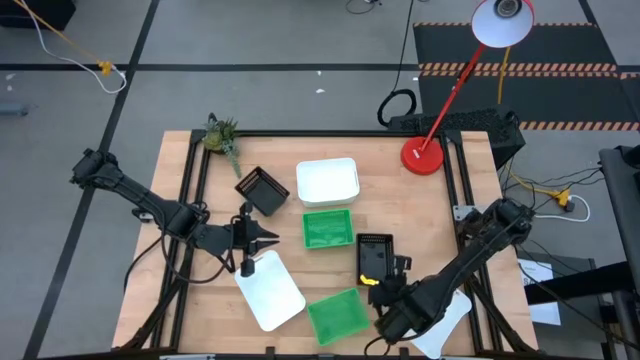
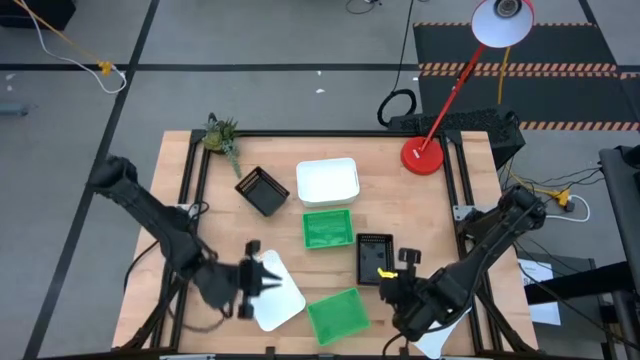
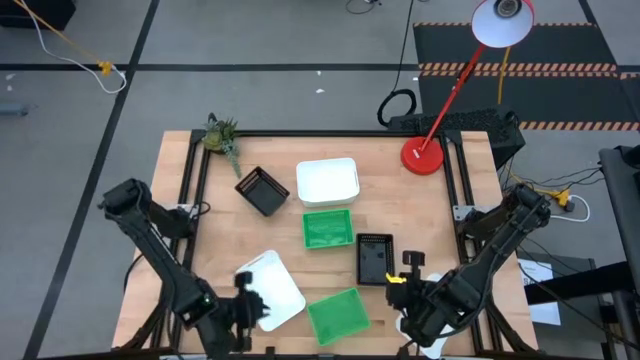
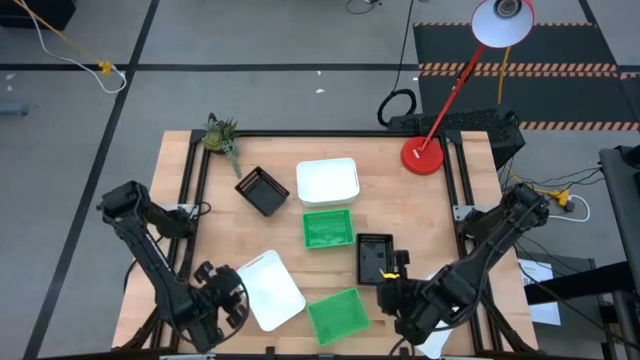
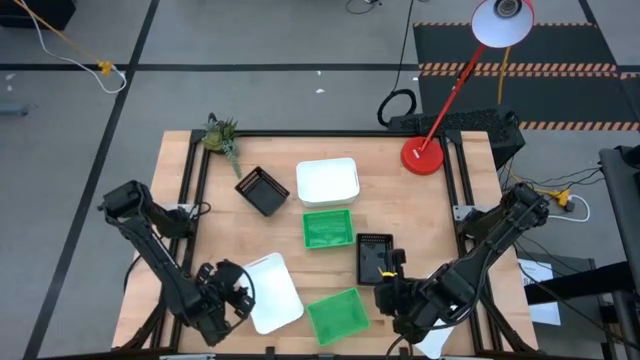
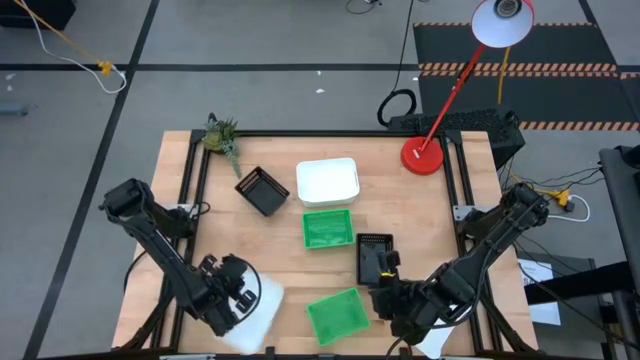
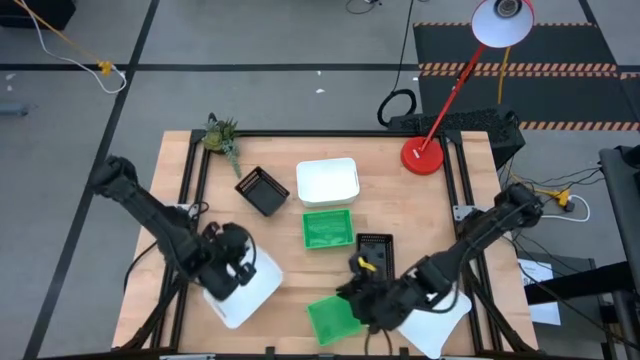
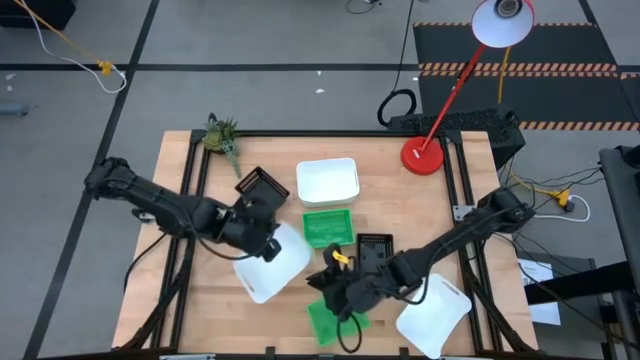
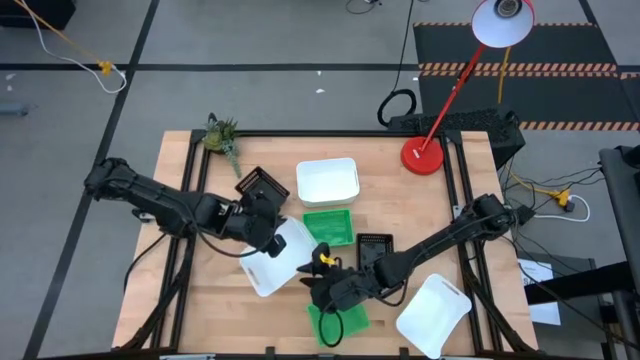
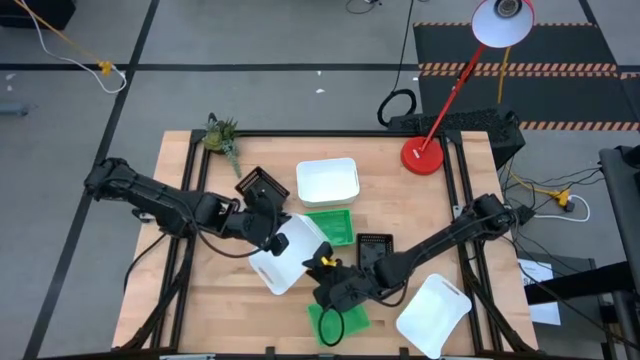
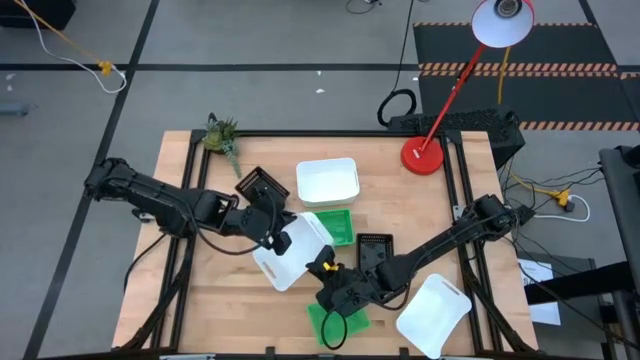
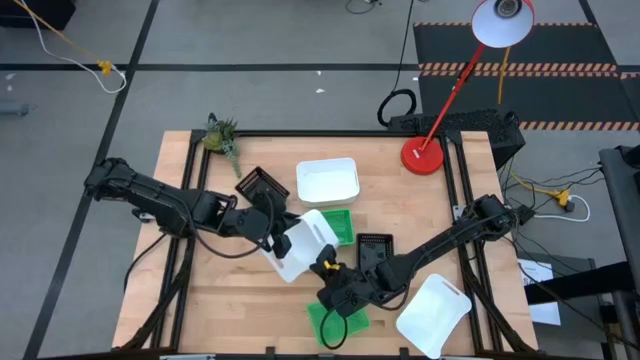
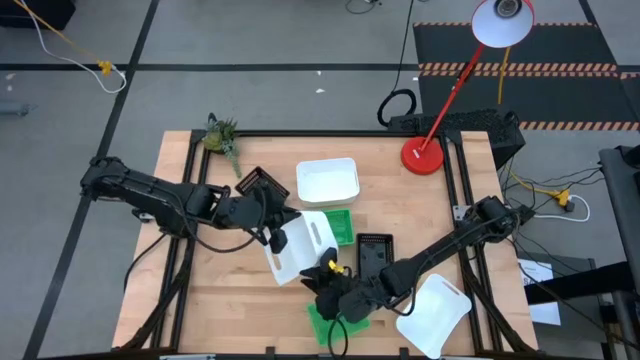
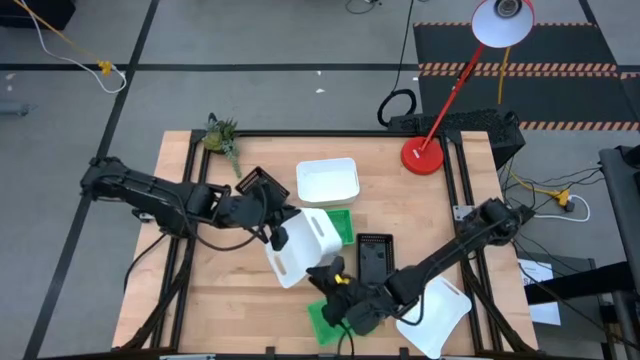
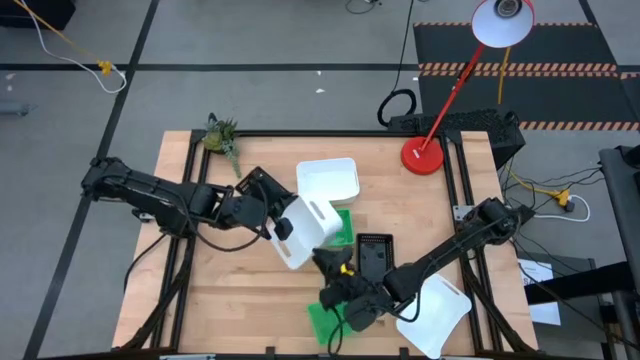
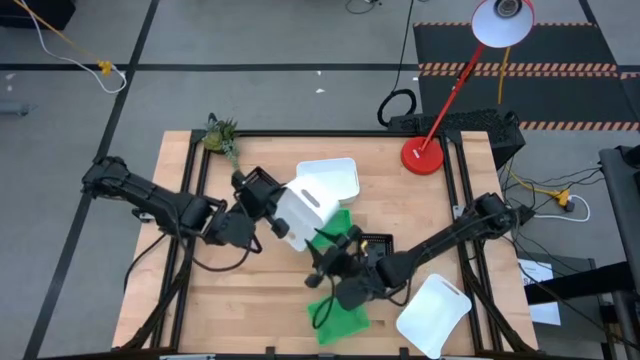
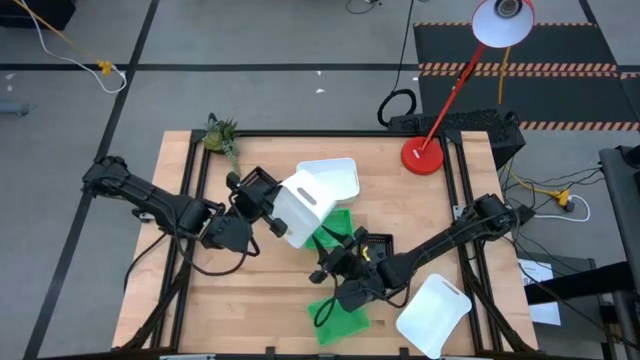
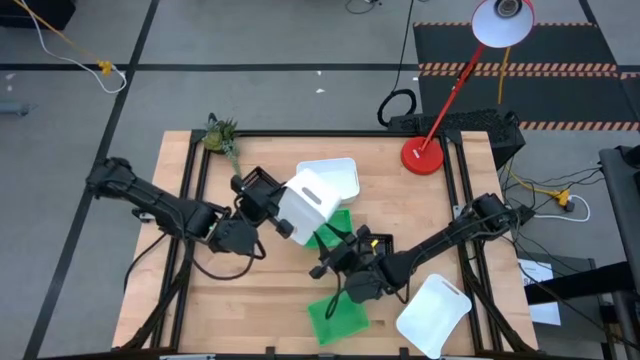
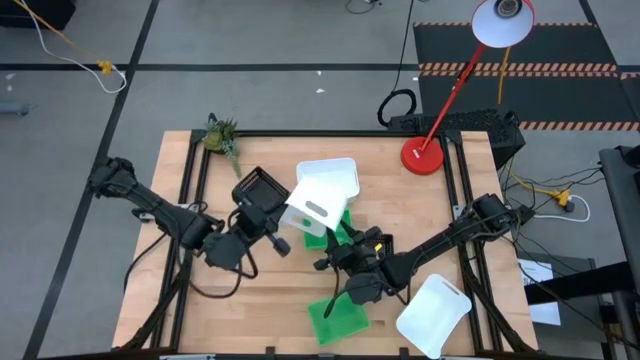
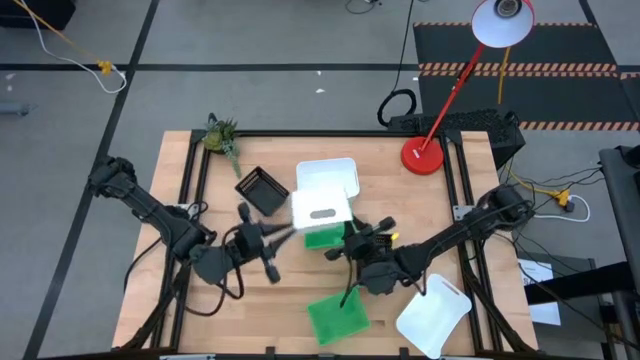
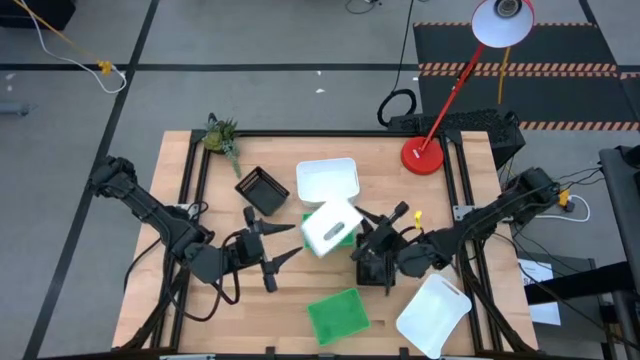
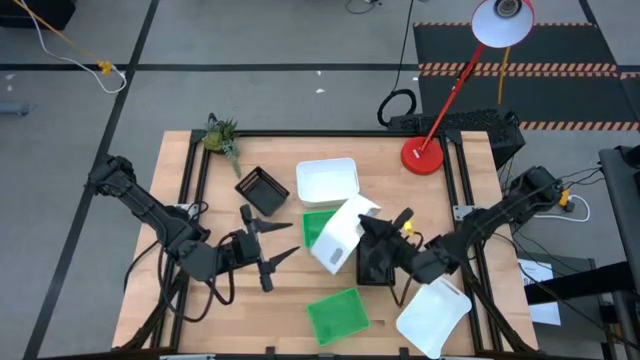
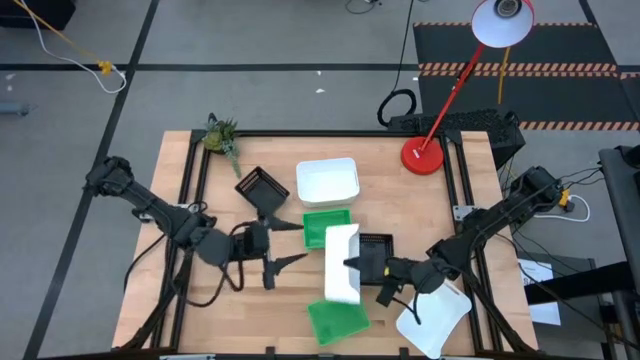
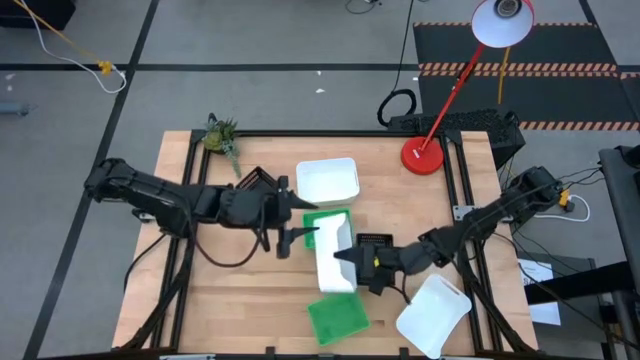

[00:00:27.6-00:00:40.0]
Stack the bottom left white bin on the top white bin

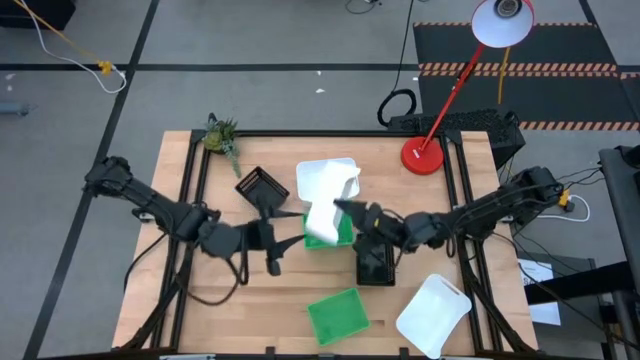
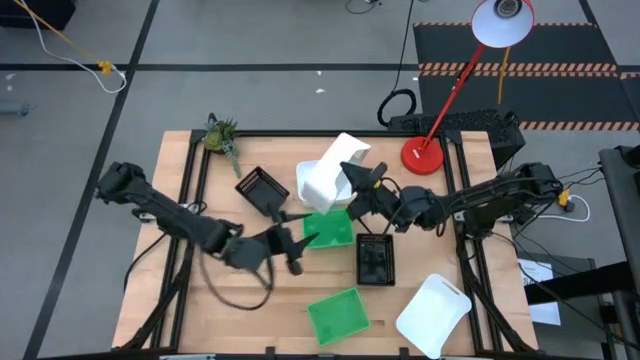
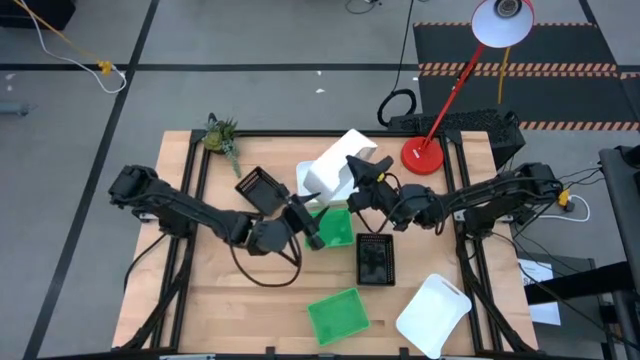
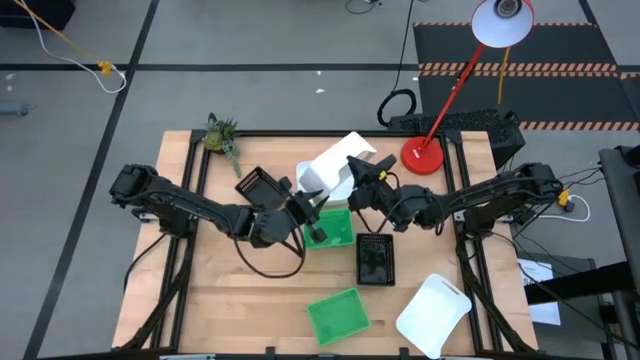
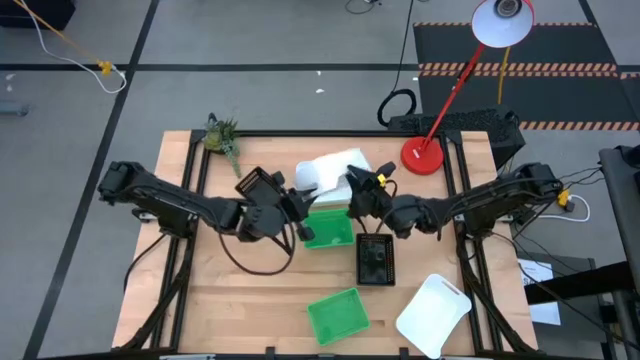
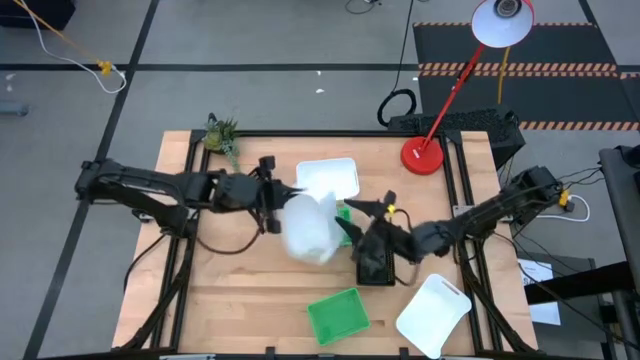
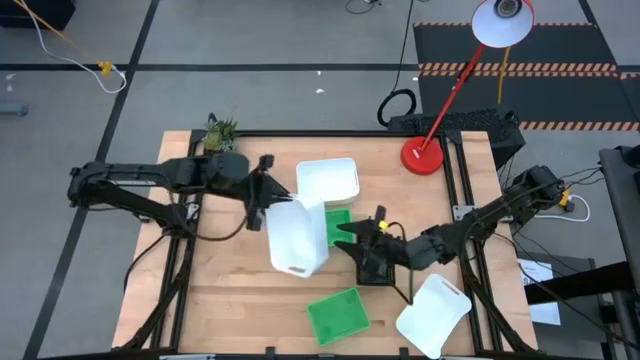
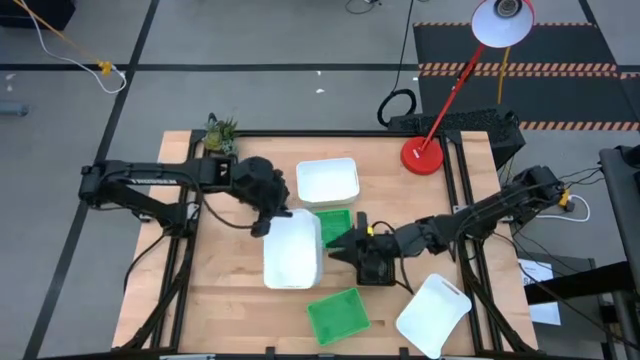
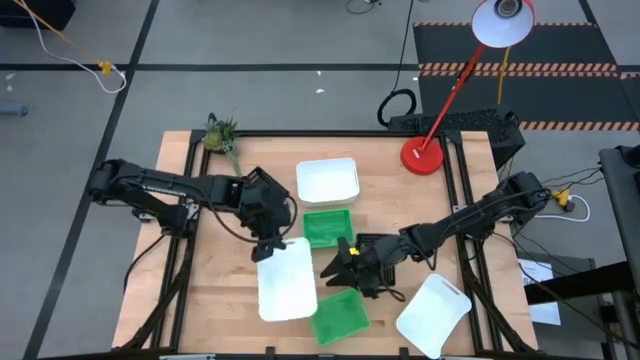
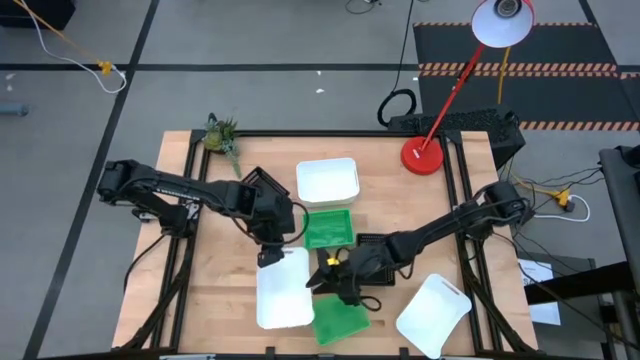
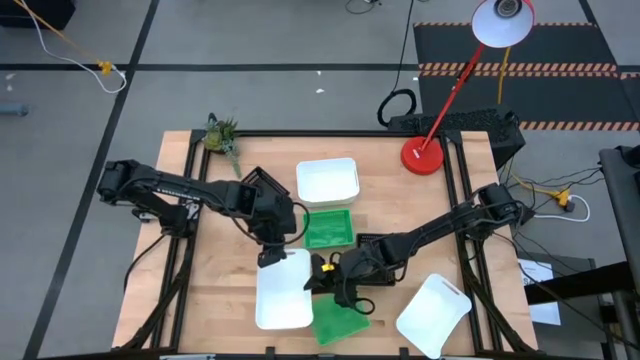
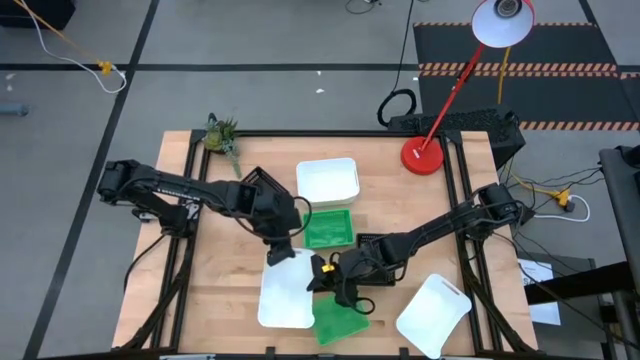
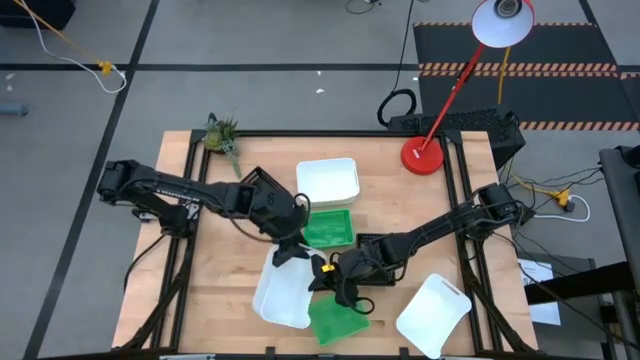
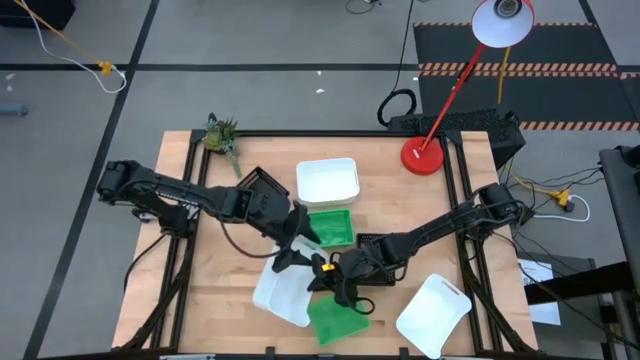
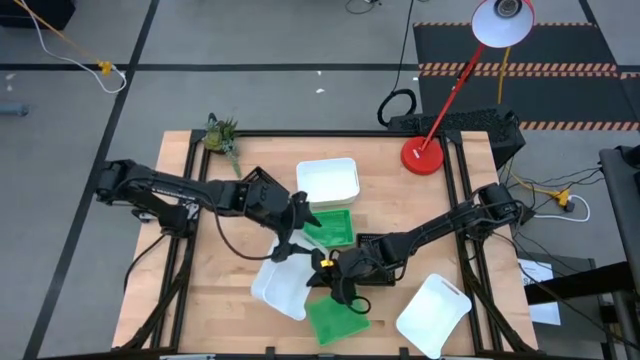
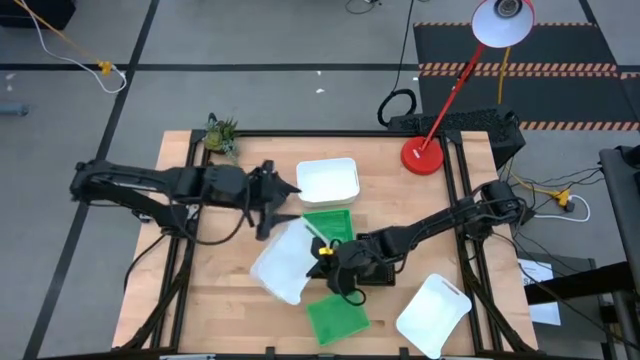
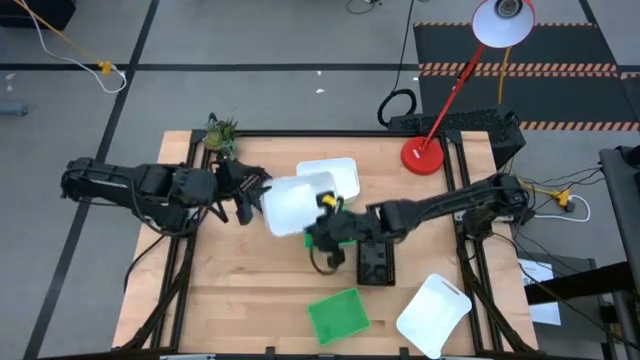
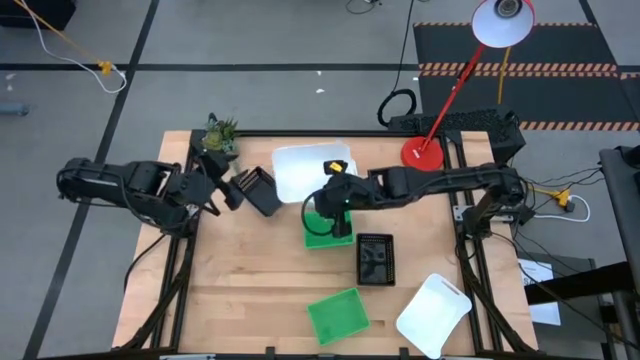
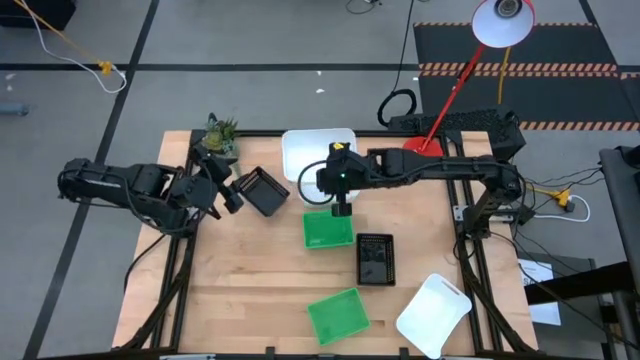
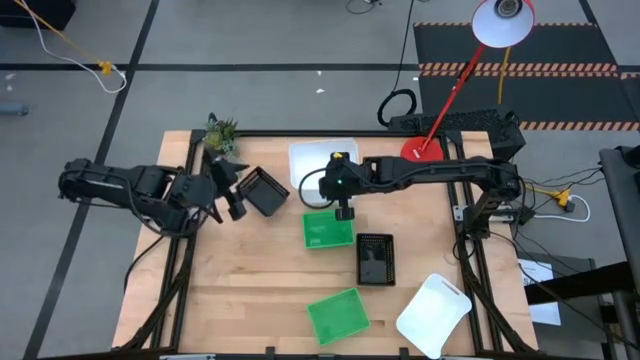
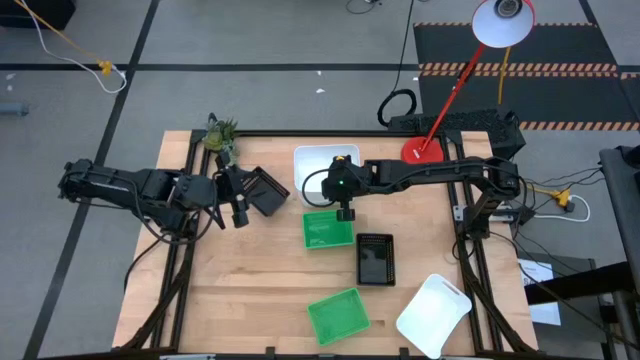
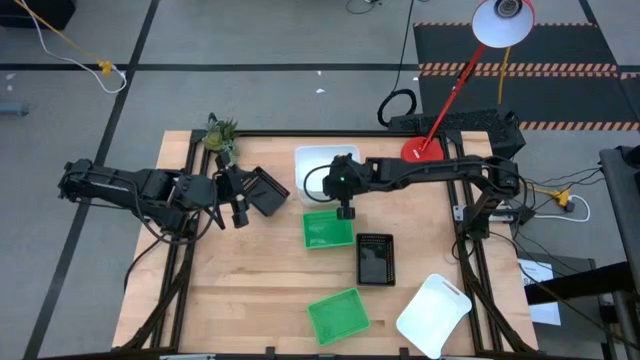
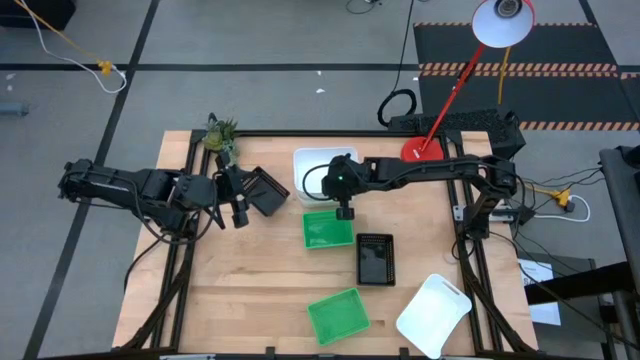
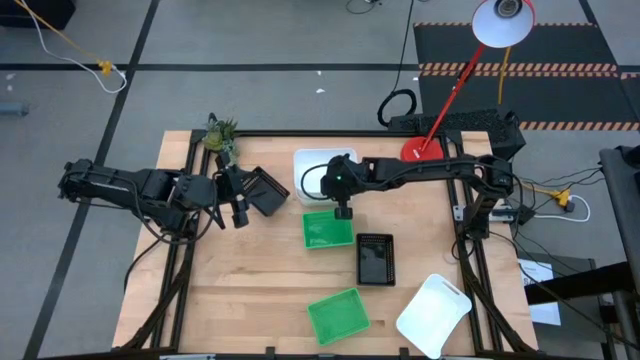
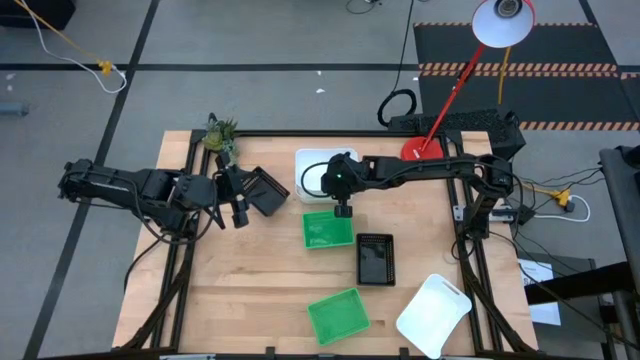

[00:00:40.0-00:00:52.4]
Stack the bottom left white bin on the top white bin
